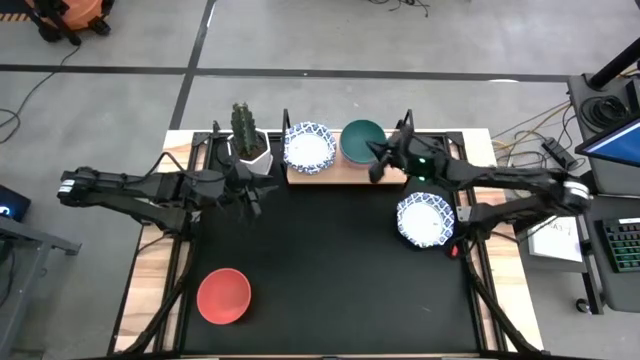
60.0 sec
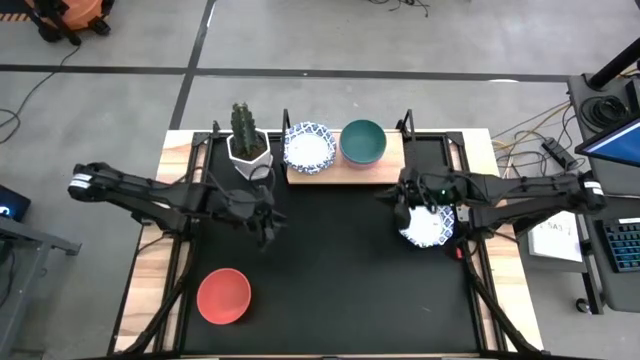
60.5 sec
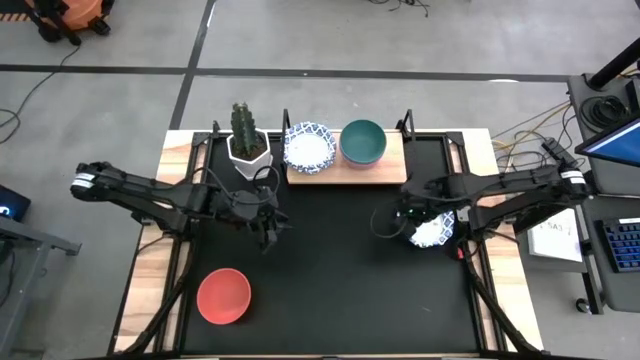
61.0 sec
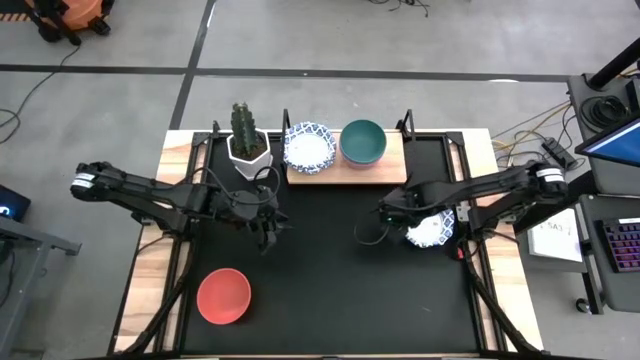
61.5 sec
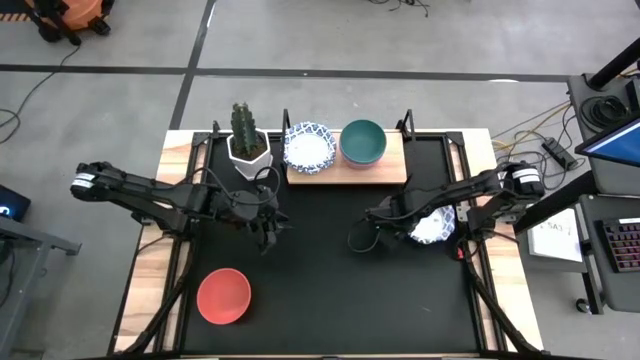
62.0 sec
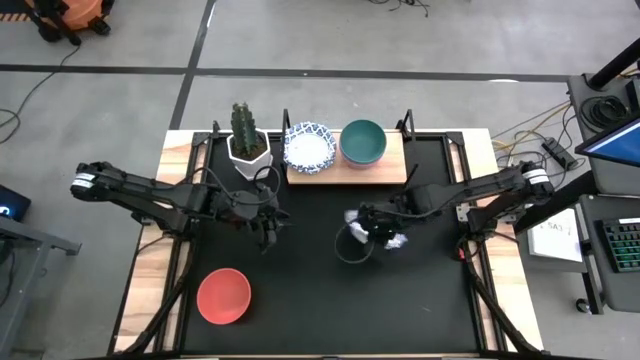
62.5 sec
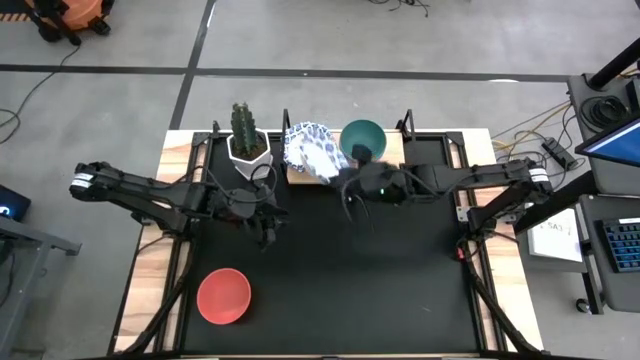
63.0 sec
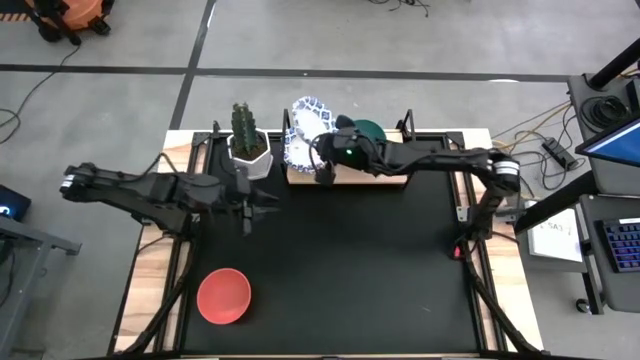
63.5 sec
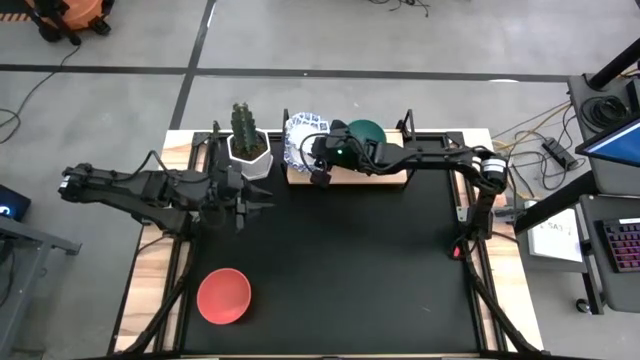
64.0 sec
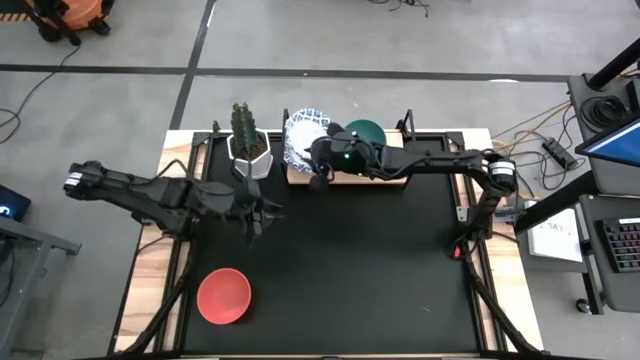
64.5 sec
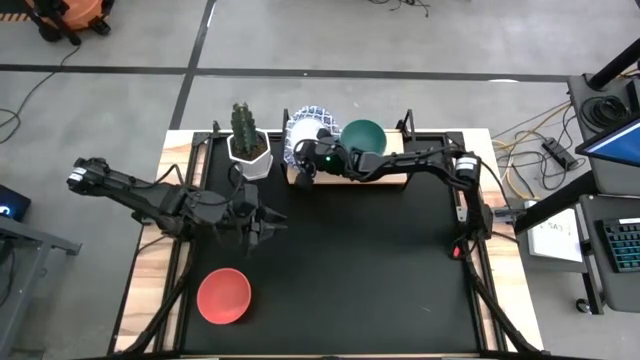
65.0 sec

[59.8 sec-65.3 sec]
Task: Place and stack bowls onto a shelf
Stack the white patterned bowl on top of the white patterned bowls on the shelf

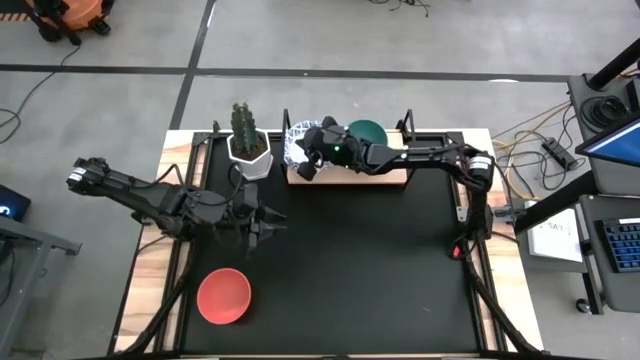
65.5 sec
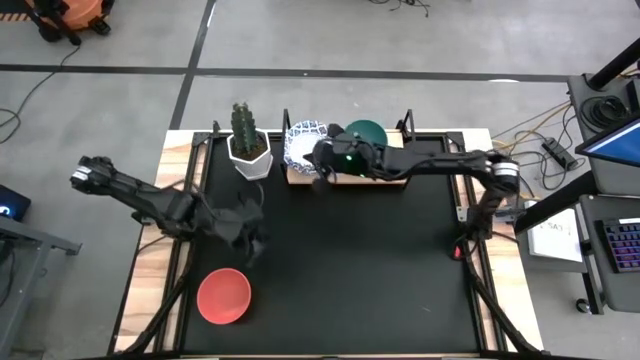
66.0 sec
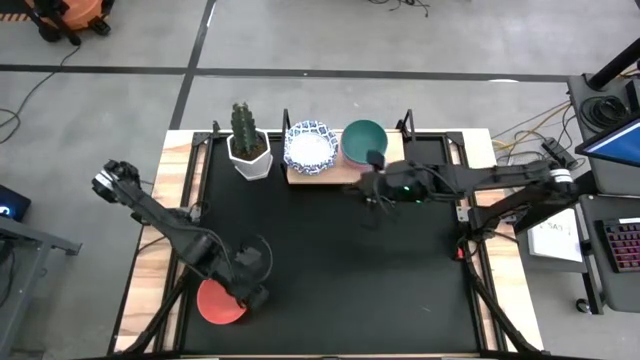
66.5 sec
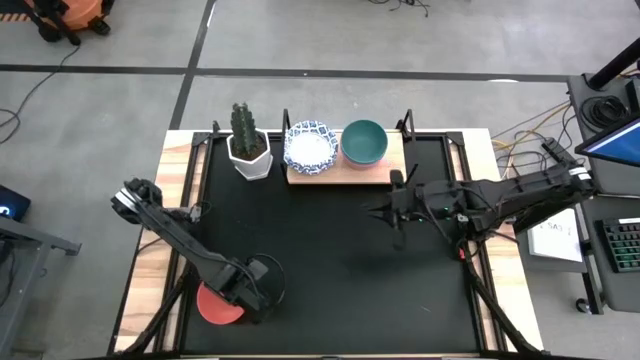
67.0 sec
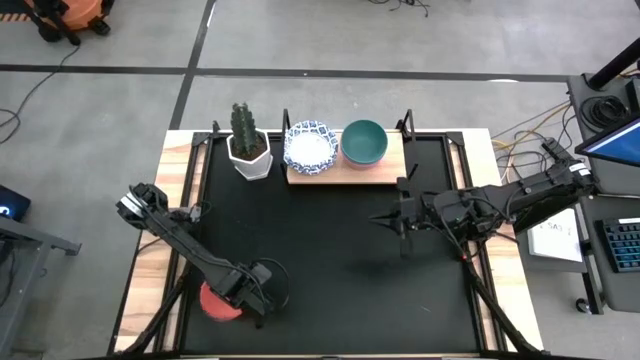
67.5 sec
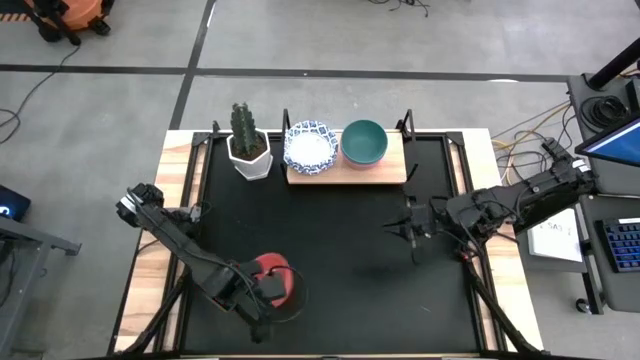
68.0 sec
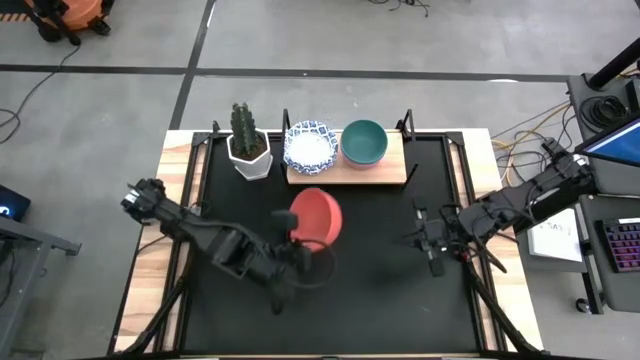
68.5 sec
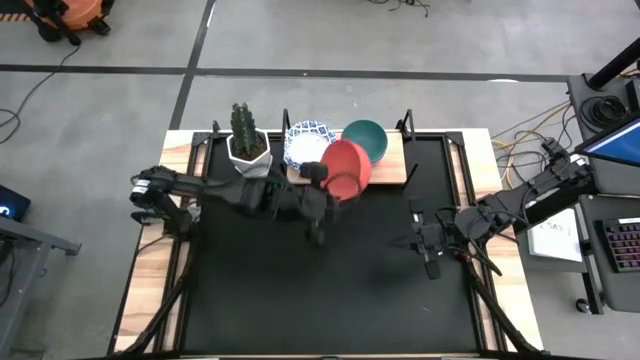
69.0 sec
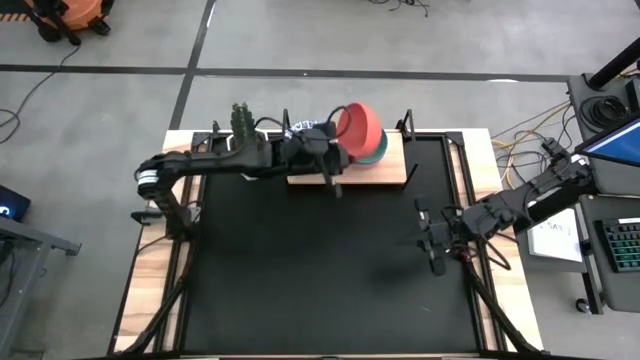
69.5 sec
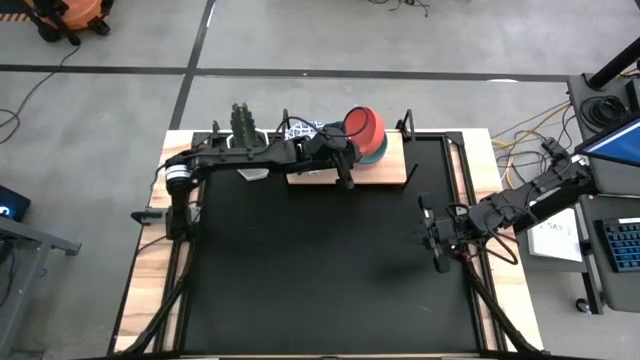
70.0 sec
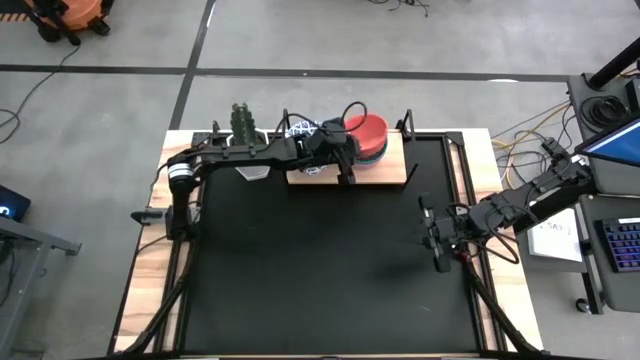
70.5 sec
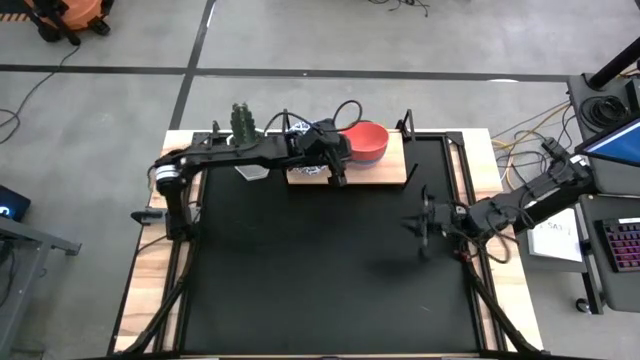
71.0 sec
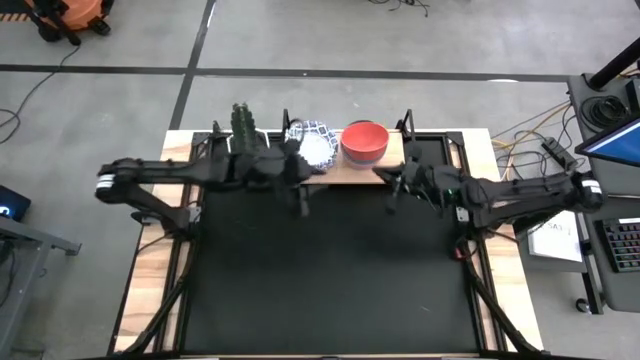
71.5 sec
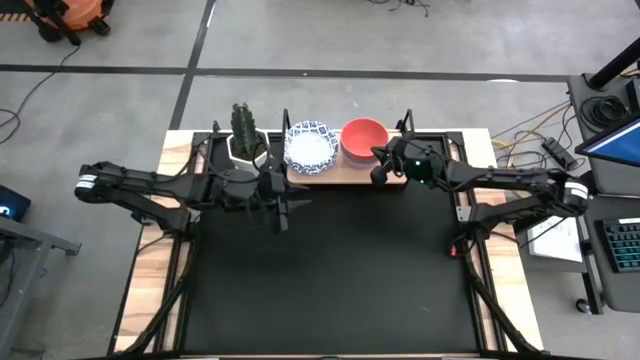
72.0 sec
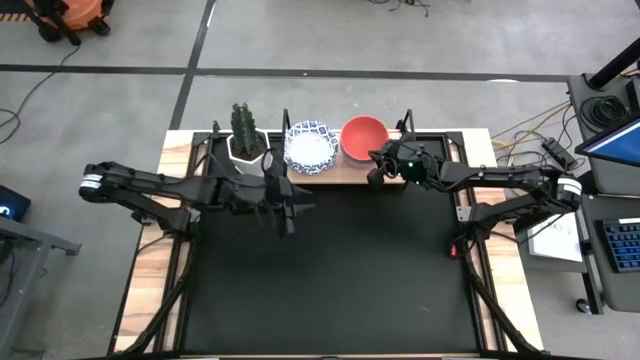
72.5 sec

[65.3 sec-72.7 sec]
Stack the orange bowl on top of the green bowl on the shelf

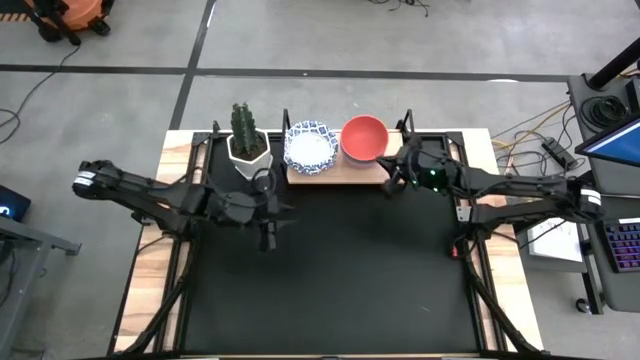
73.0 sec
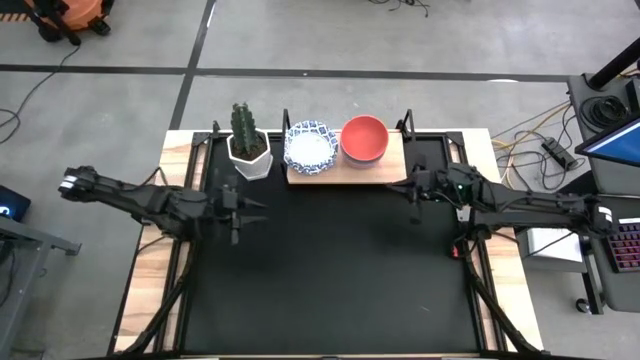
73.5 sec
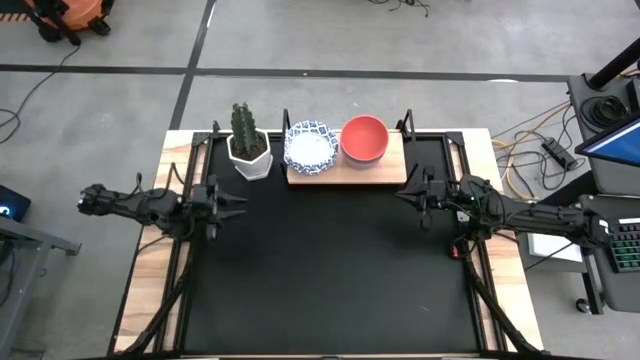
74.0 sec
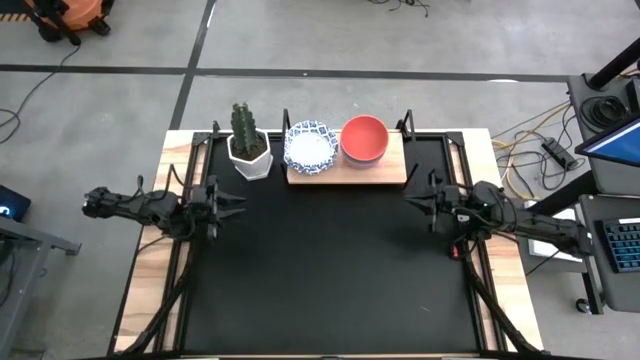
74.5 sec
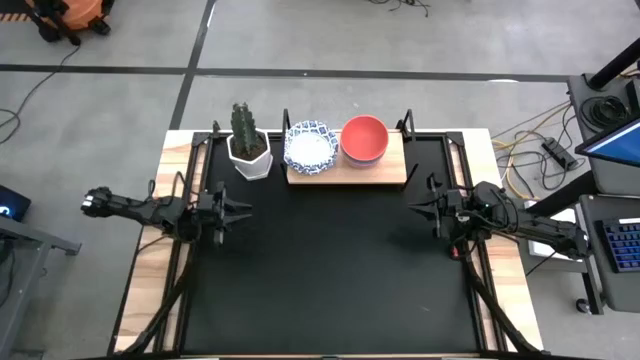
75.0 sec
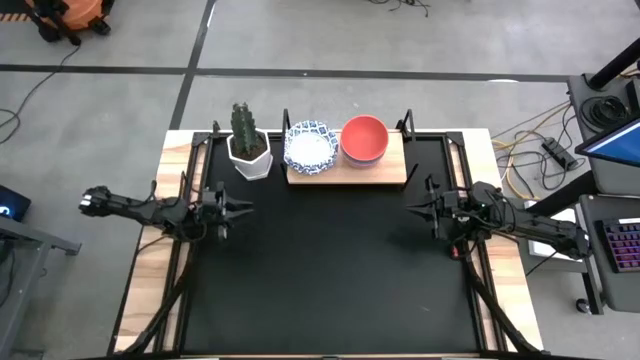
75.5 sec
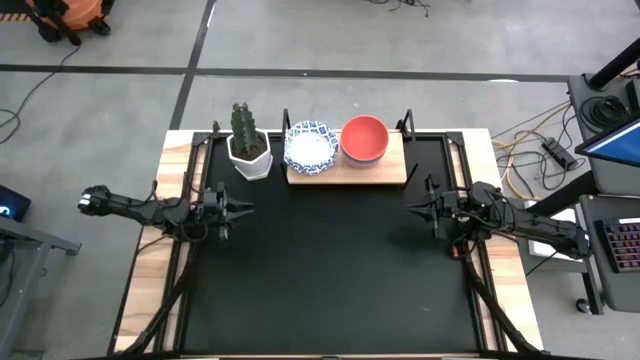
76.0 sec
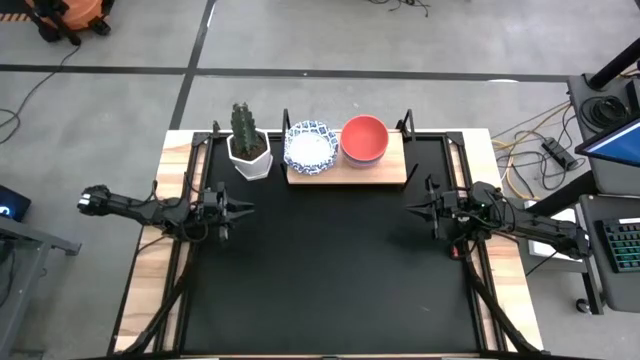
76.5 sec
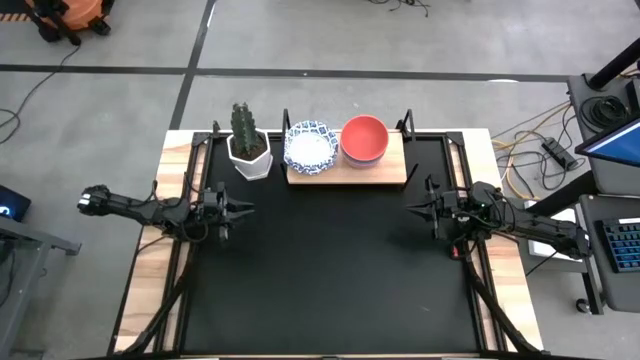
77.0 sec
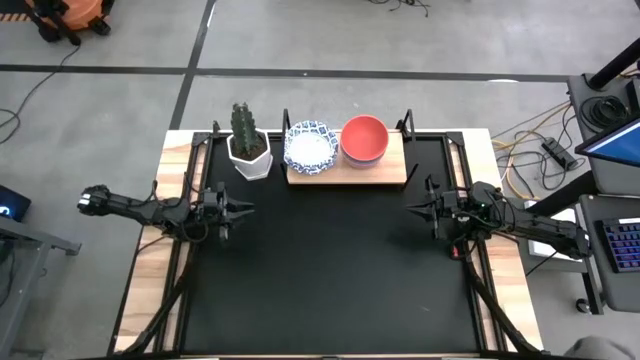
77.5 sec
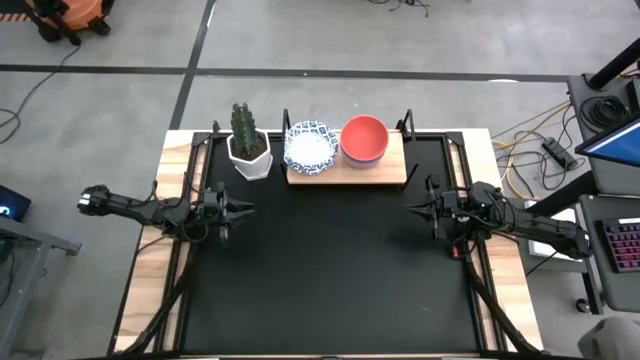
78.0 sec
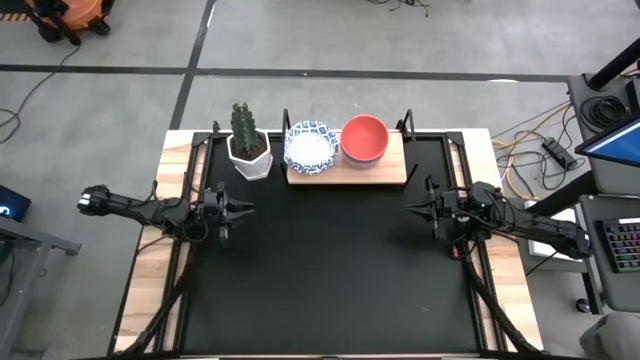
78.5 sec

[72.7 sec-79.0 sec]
Return to Home Position

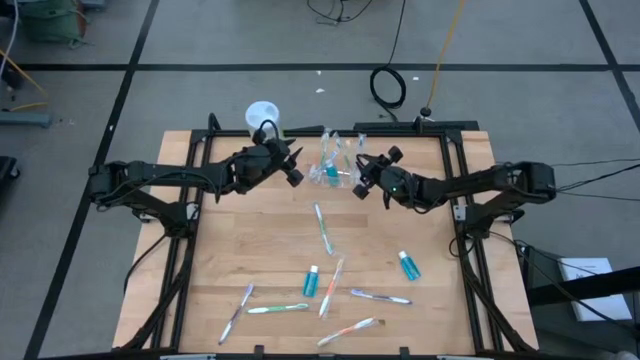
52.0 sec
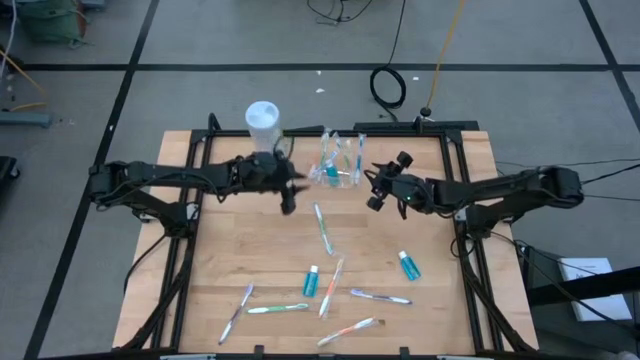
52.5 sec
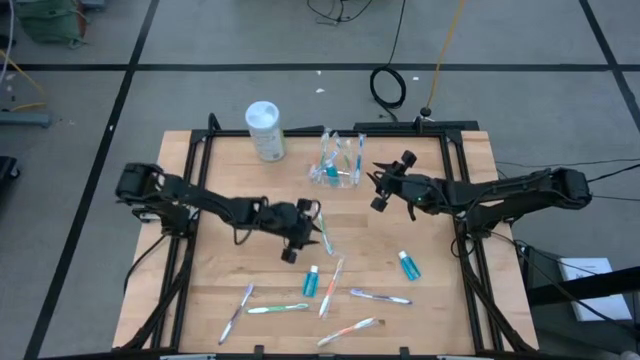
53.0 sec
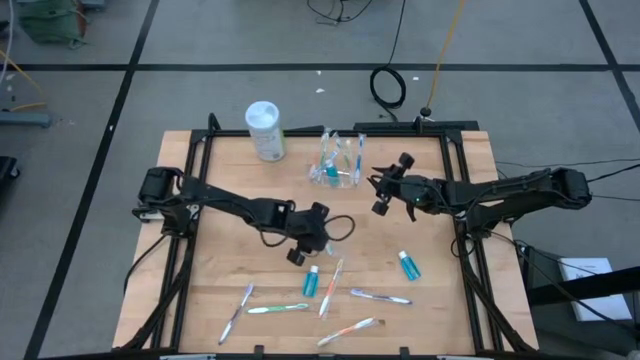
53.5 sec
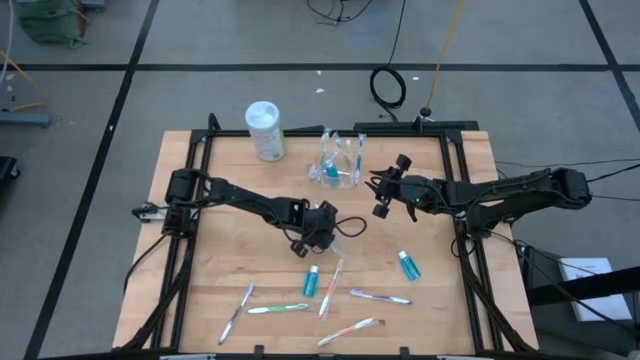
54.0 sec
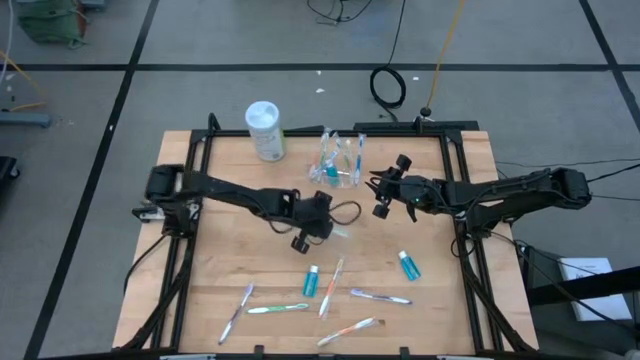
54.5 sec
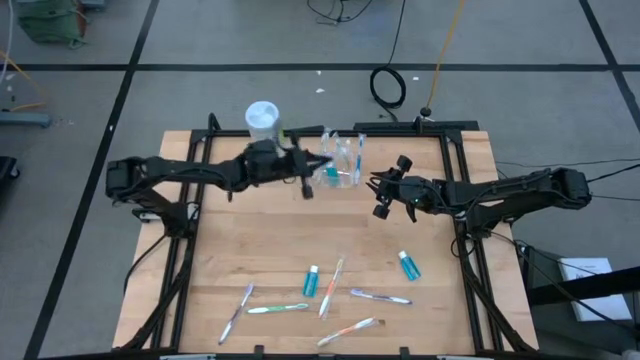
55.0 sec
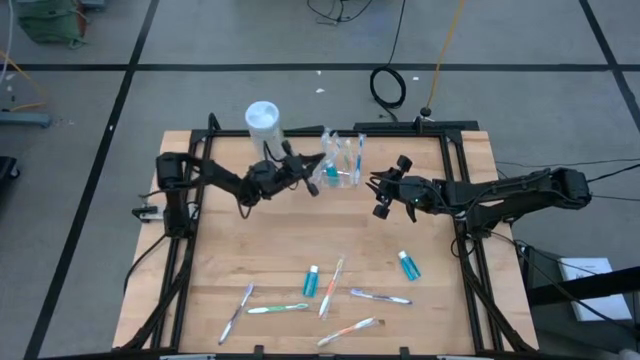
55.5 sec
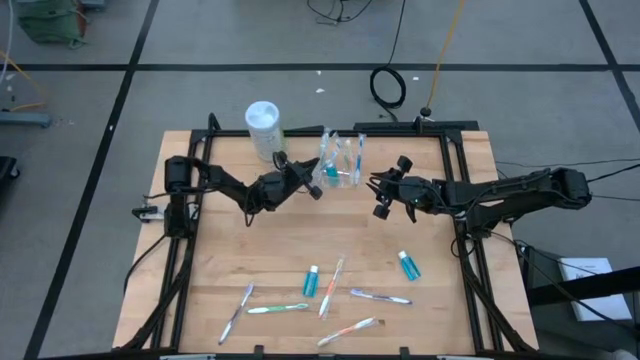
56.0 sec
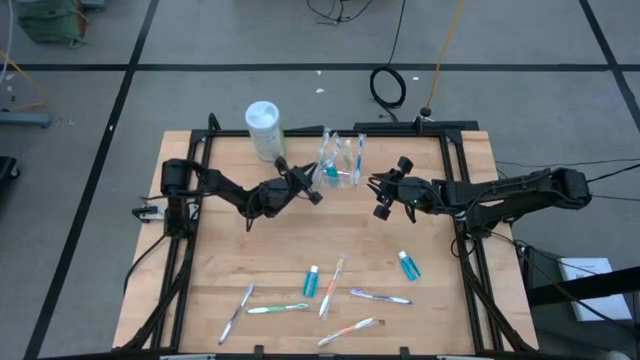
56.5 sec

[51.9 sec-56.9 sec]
Task: Pick & Place toothbrushing station
Put the green toothbrush into the transparent organizer
